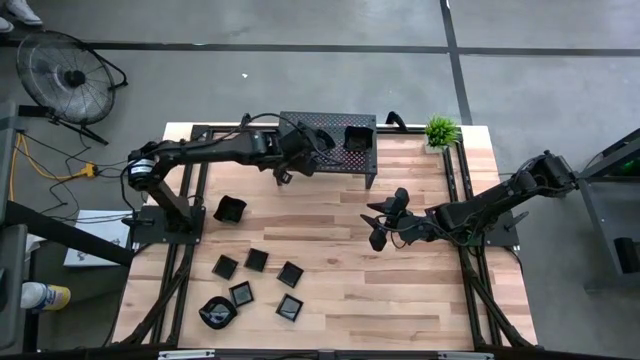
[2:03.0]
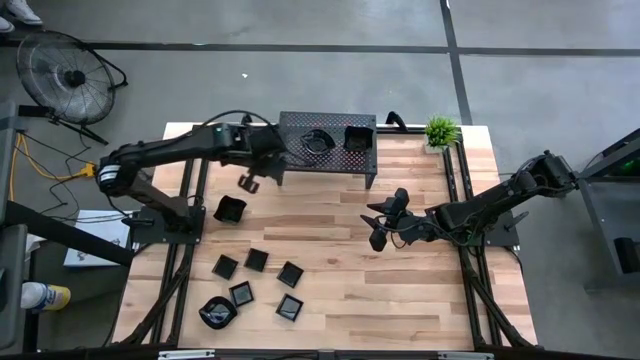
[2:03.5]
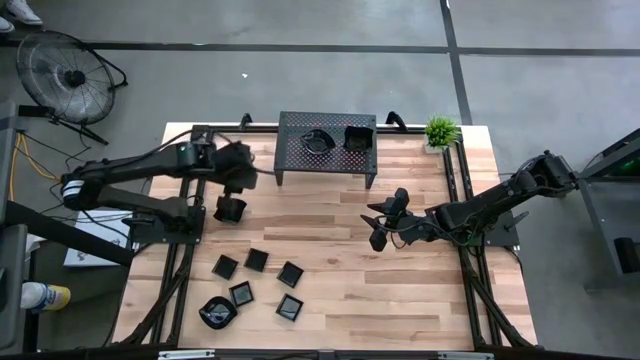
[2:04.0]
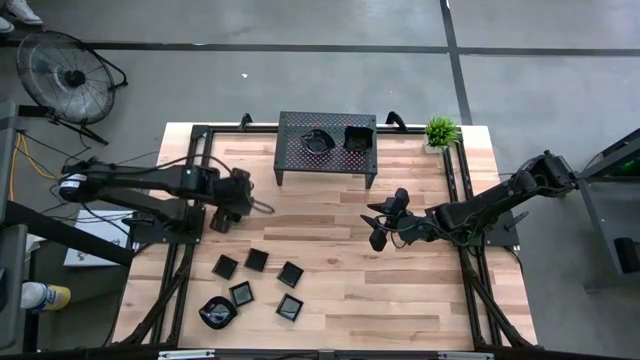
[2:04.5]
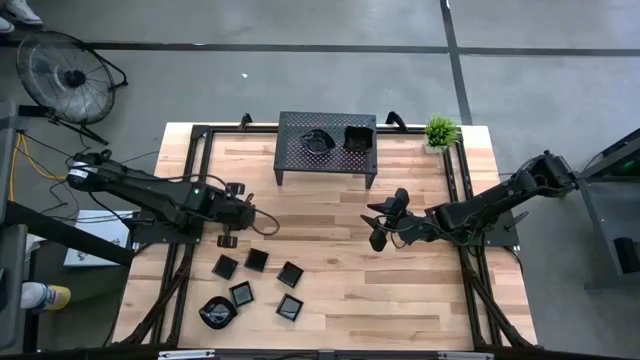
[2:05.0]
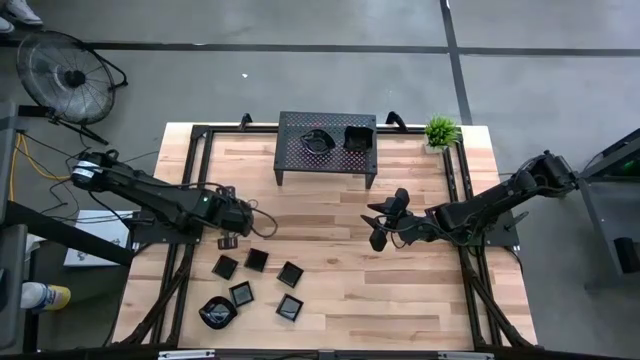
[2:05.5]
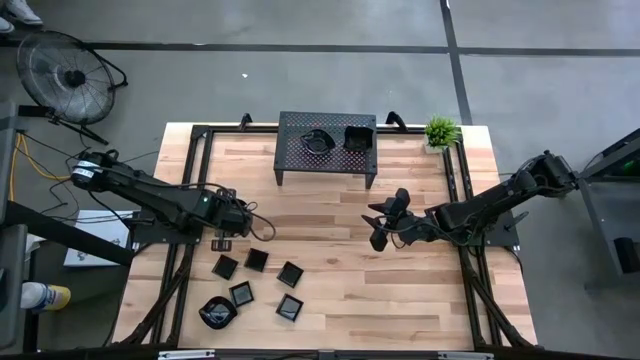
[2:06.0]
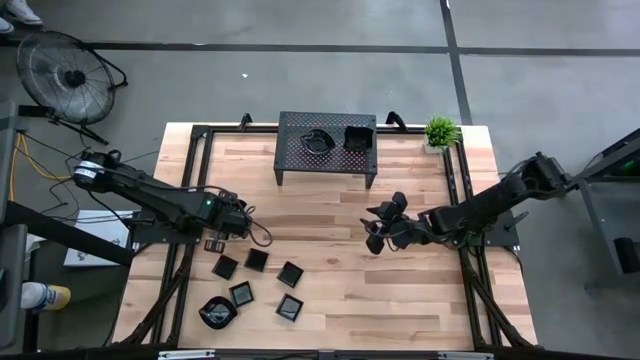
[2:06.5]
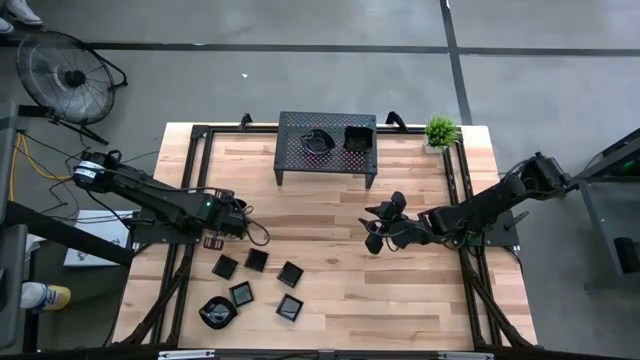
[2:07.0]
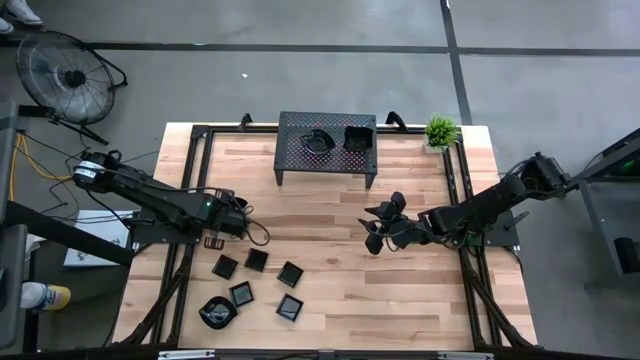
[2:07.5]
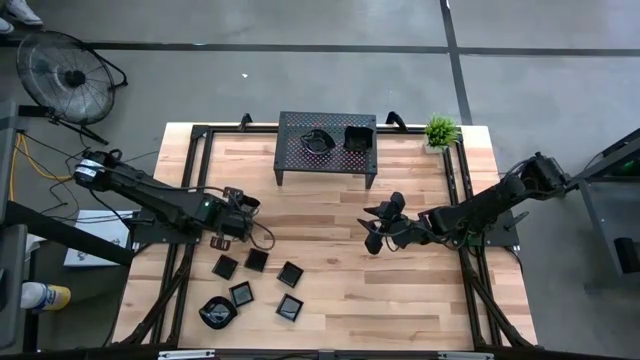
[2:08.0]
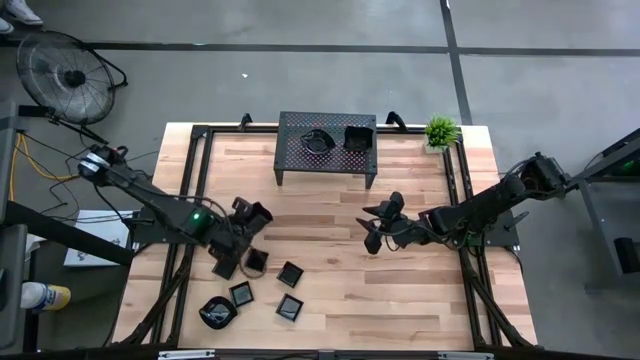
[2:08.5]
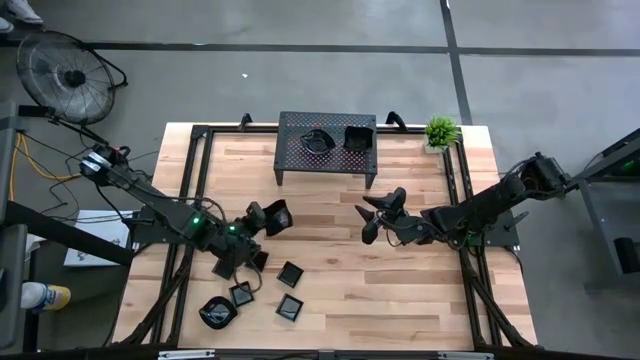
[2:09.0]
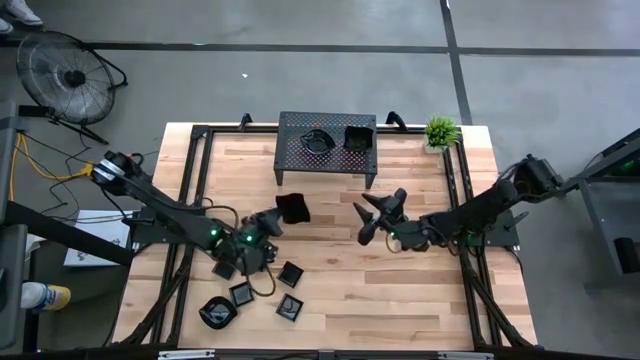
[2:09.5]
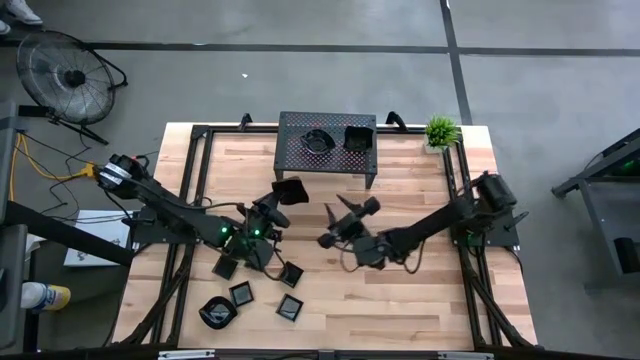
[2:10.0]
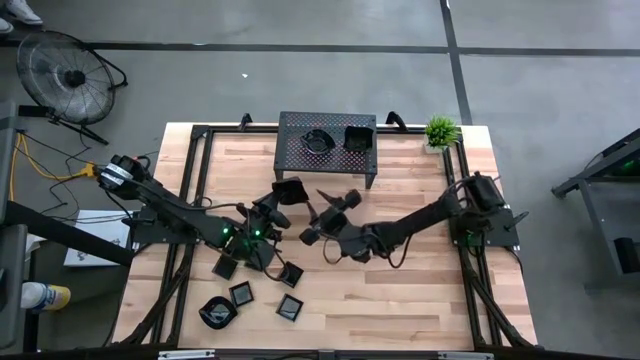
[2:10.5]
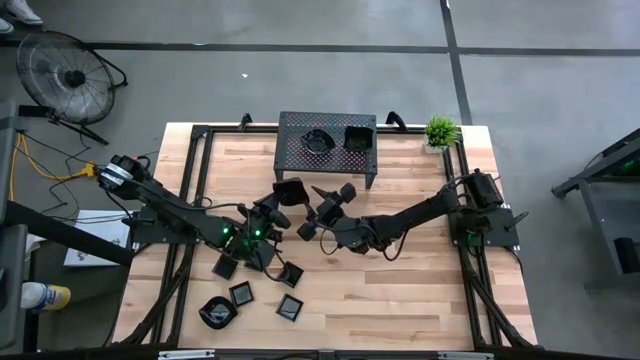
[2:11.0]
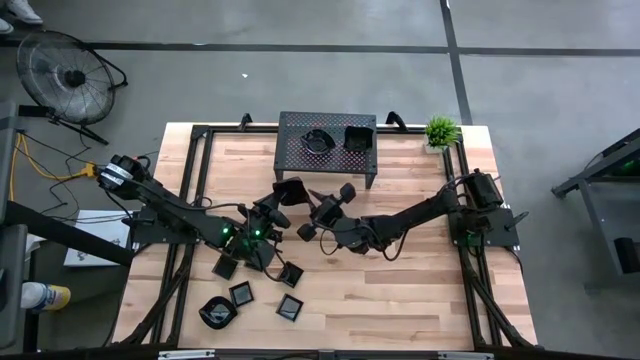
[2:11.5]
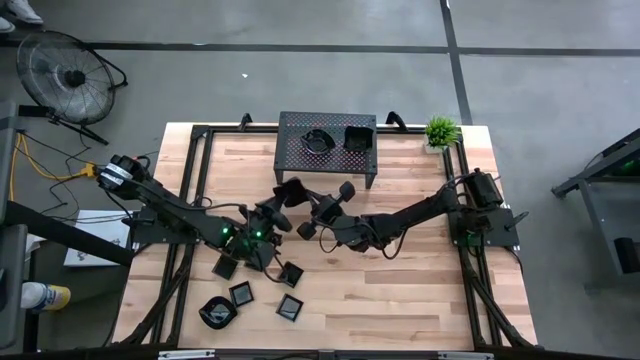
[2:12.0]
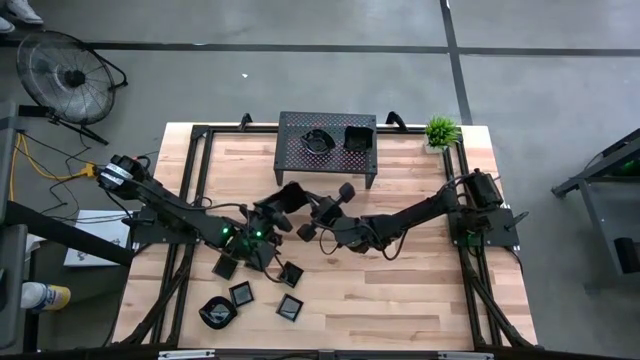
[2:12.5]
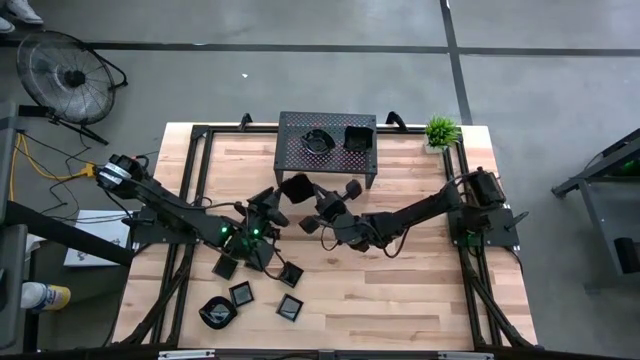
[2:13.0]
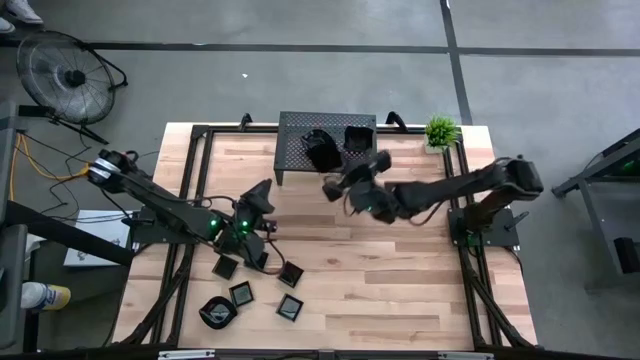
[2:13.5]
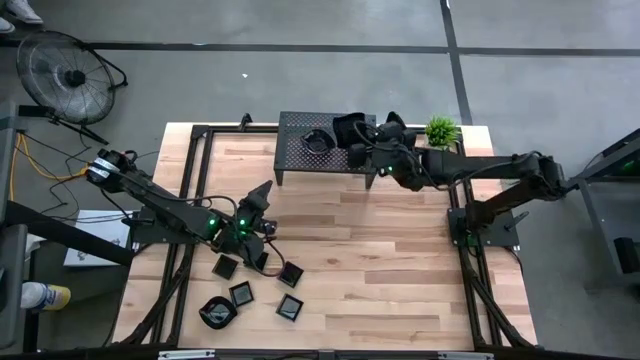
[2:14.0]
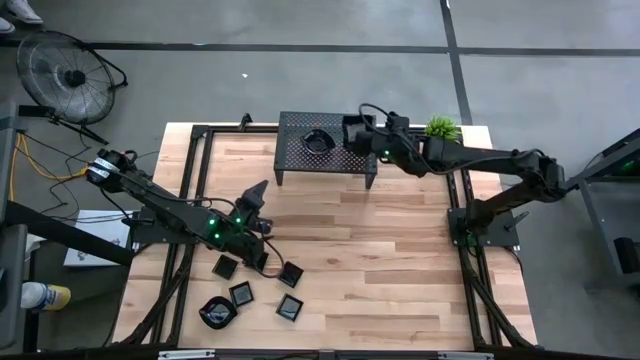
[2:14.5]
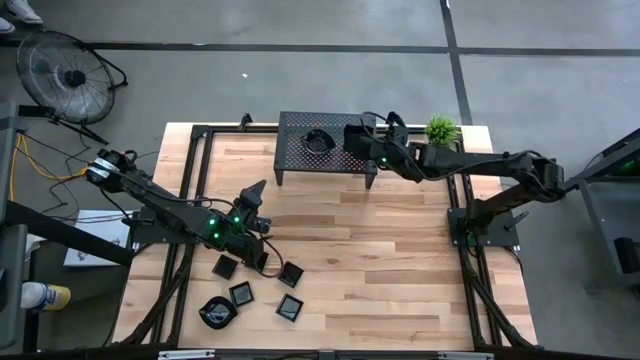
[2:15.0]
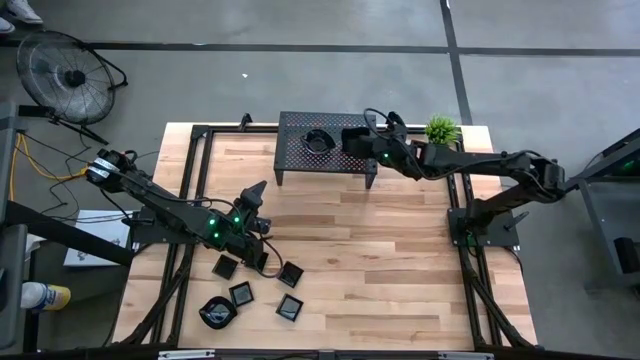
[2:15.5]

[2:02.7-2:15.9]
Task: Pick & Place Mini shaped plates
Stack the black distorted square plate on top of the black distorted square plates on the shelf

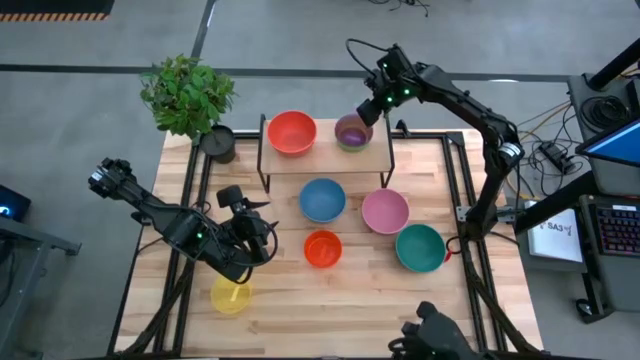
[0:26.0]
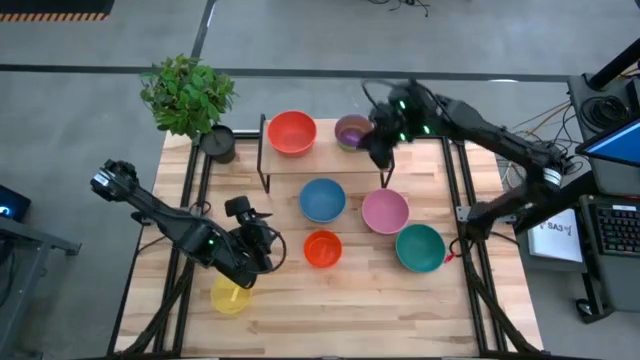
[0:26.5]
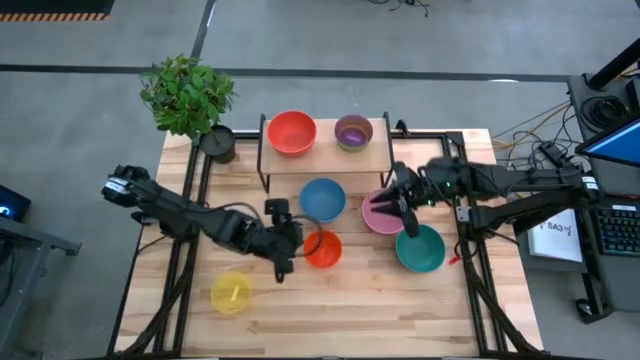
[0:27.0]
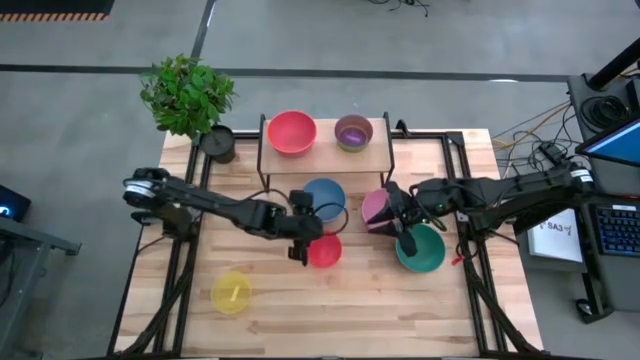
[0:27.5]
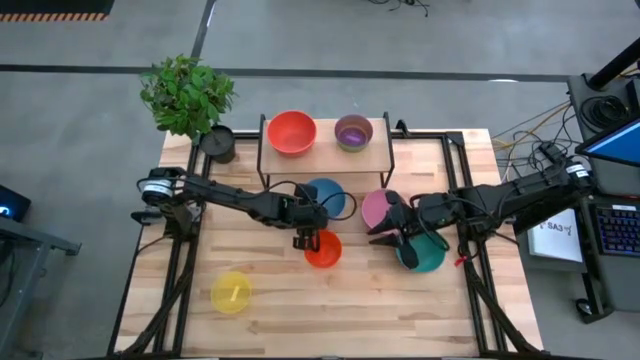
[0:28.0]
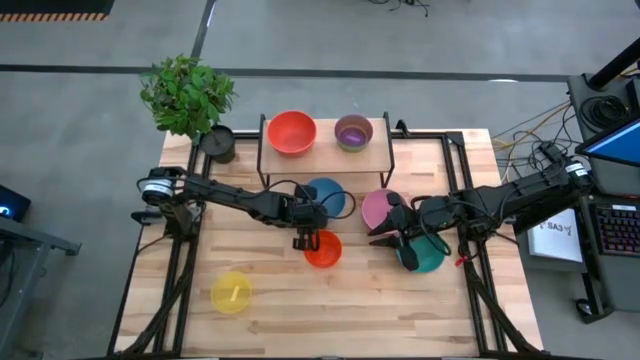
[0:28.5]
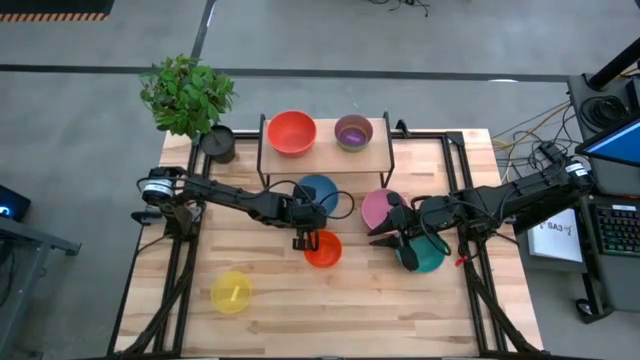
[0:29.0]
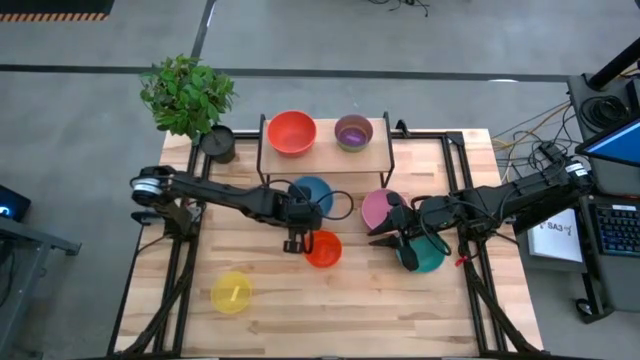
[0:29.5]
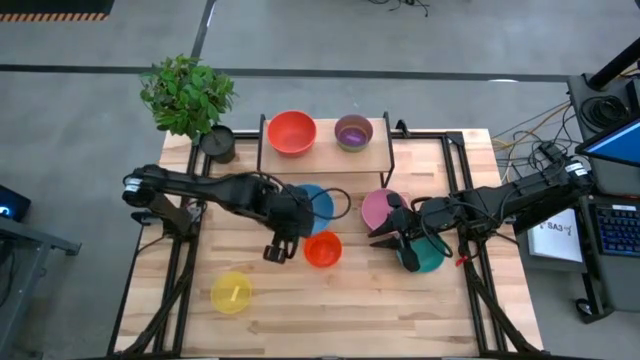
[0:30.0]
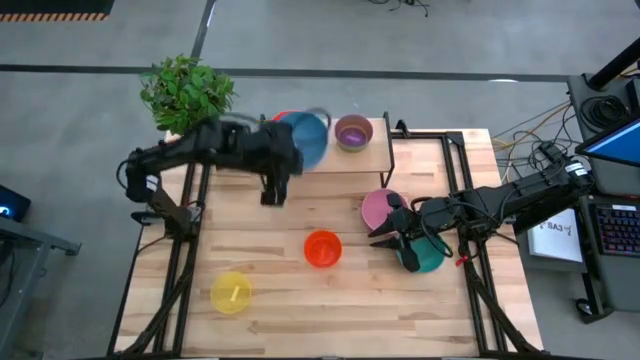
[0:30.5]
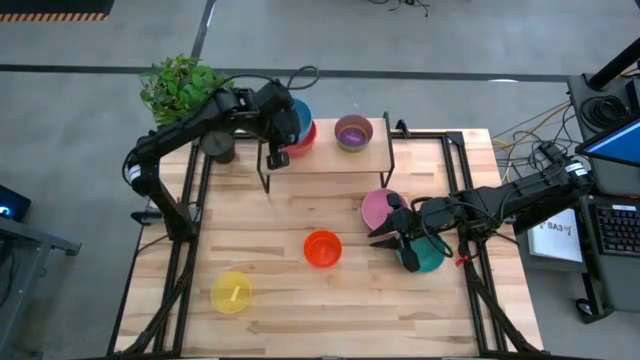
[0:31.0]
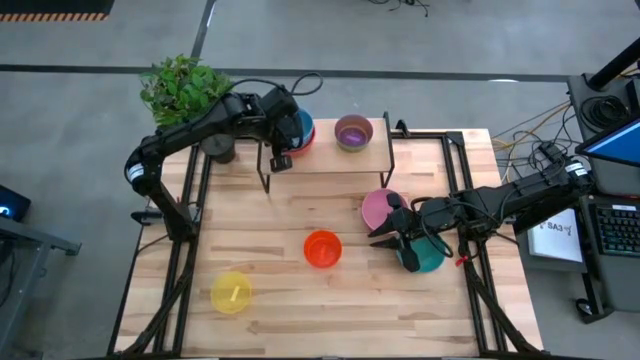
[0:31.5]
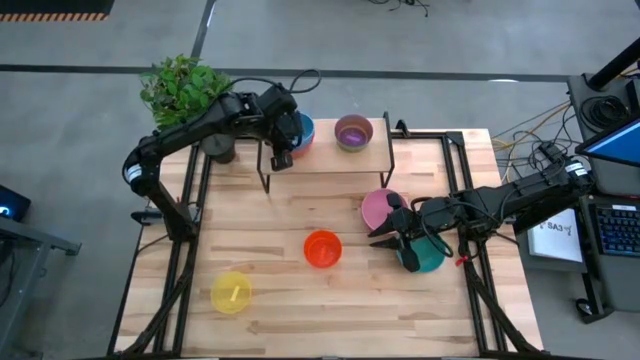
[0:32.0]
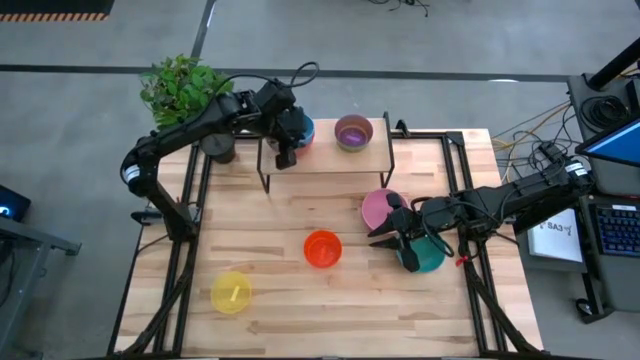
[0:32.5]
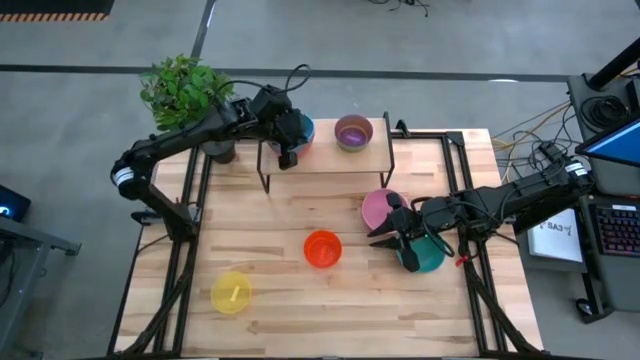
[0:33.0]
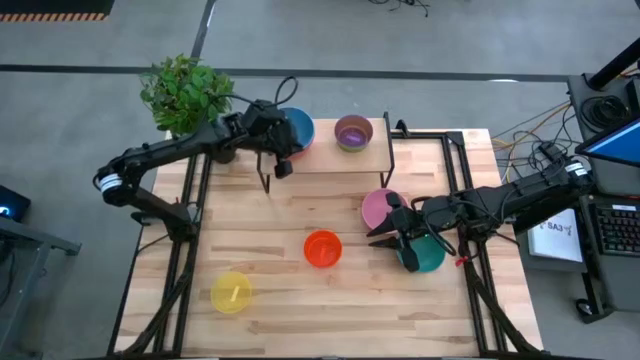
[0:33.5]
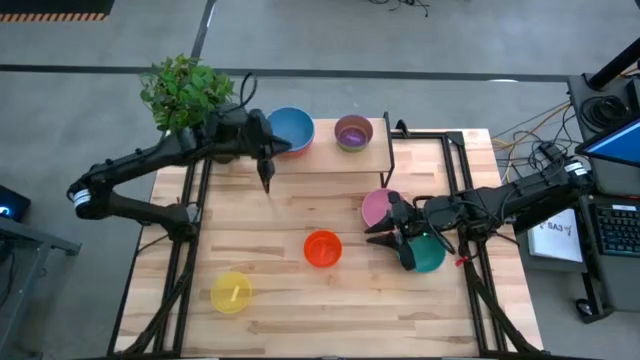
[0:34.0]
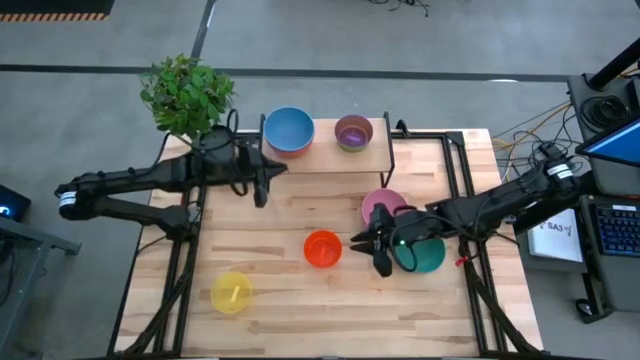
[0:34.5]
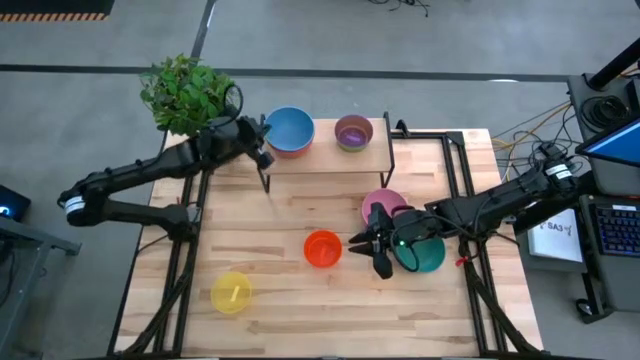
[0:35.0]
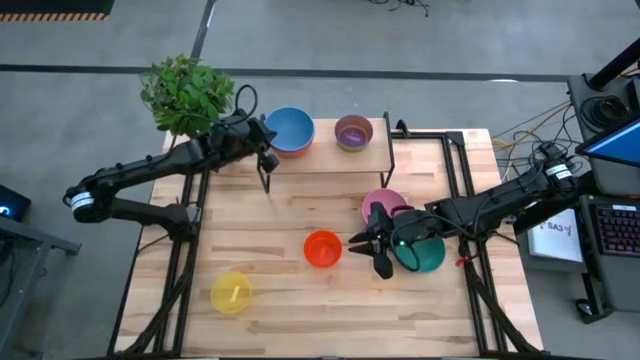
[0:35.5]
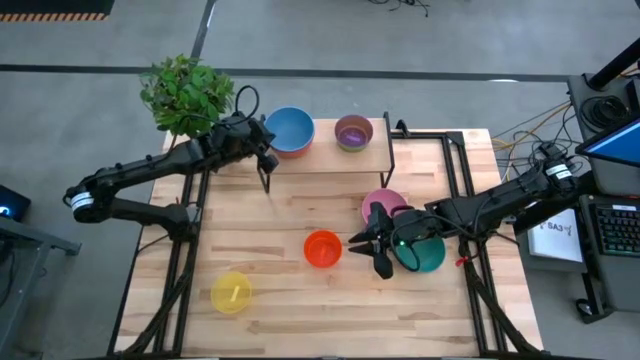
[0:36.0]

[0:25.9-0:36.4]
Task: Place and stack bowls onto a shelf
Stack the large blue bowl on top of the large orange bowl on the shelf
